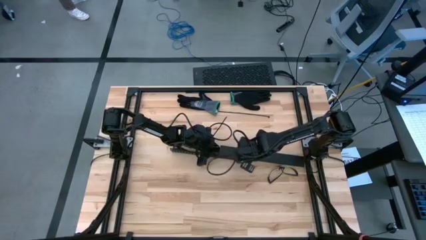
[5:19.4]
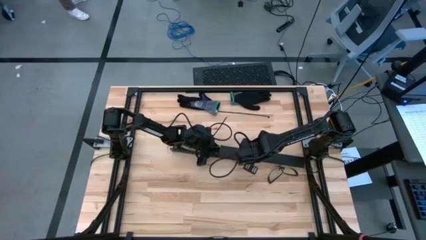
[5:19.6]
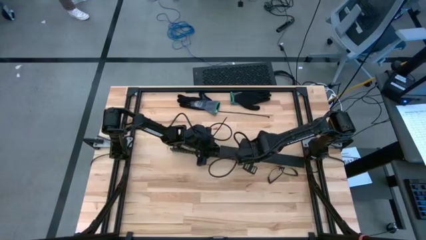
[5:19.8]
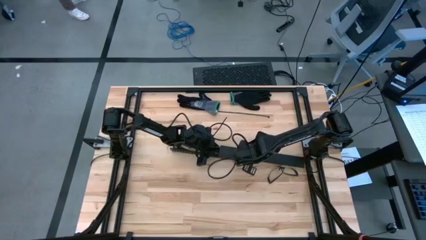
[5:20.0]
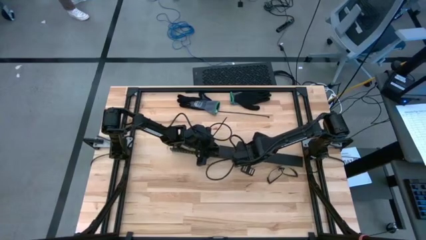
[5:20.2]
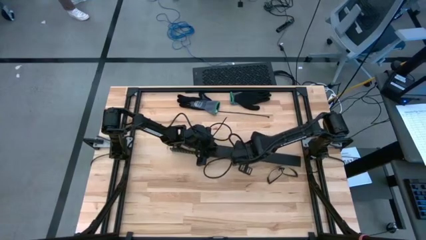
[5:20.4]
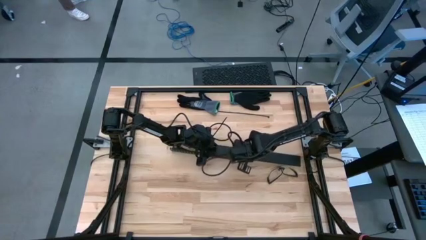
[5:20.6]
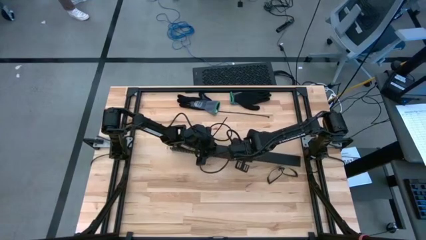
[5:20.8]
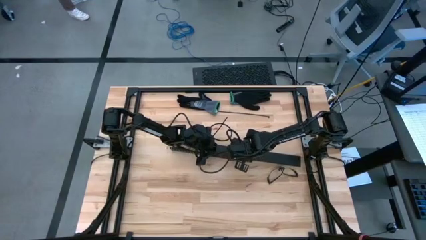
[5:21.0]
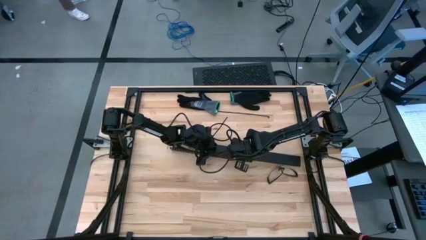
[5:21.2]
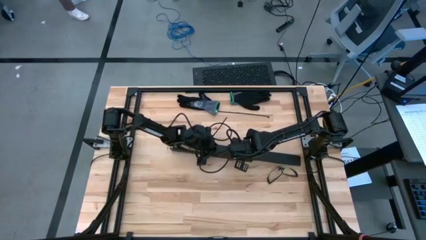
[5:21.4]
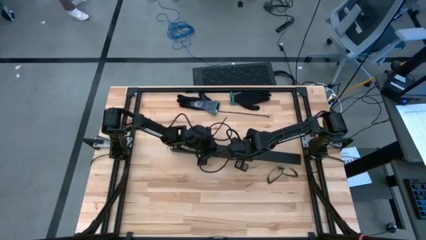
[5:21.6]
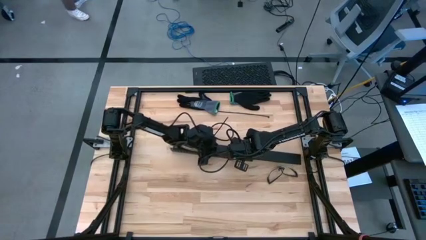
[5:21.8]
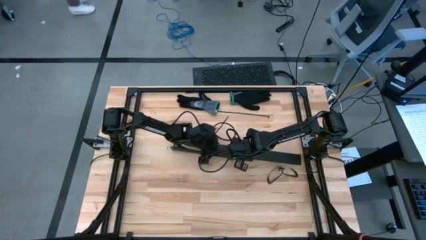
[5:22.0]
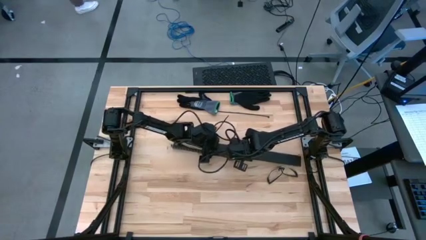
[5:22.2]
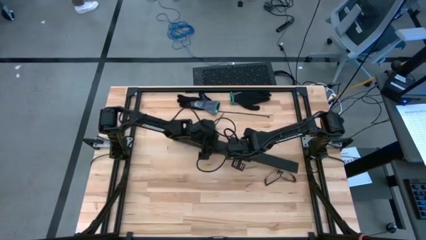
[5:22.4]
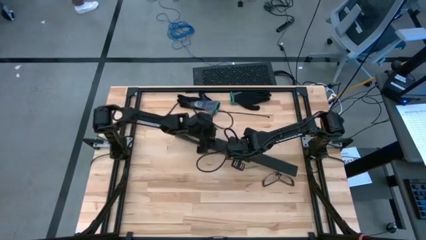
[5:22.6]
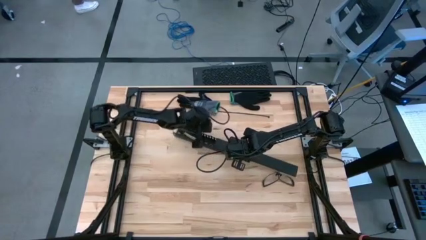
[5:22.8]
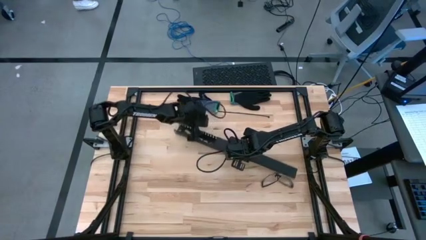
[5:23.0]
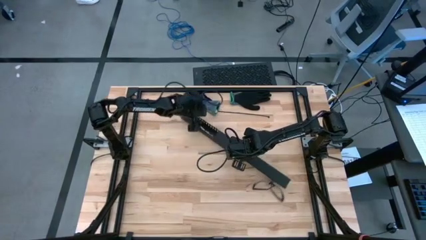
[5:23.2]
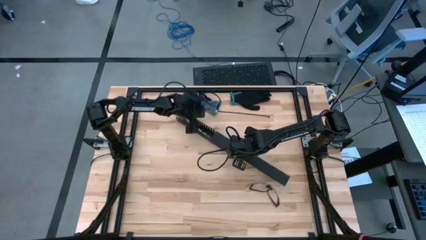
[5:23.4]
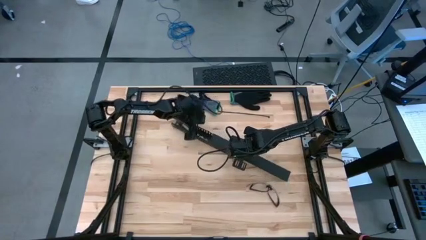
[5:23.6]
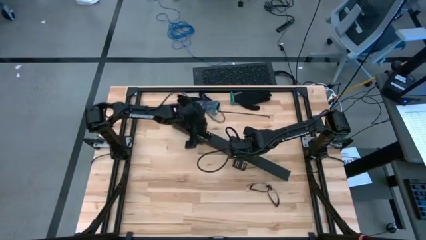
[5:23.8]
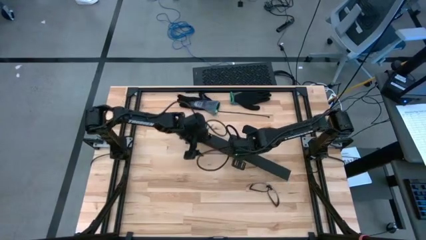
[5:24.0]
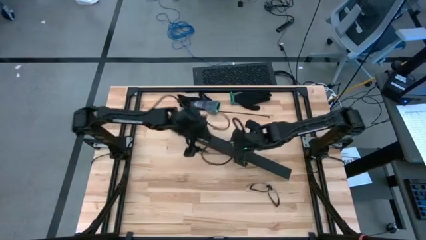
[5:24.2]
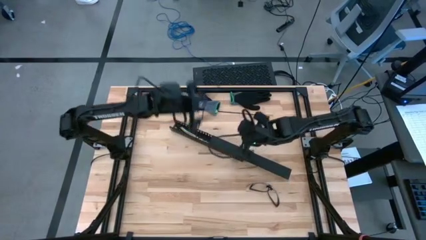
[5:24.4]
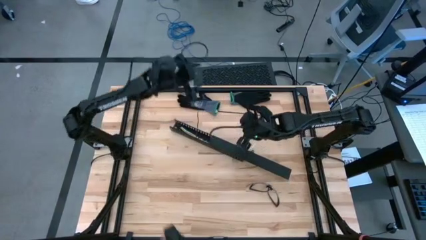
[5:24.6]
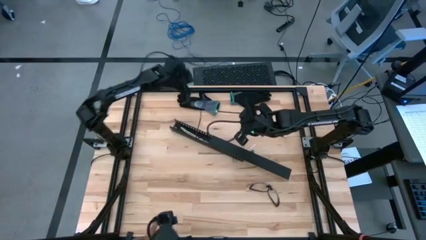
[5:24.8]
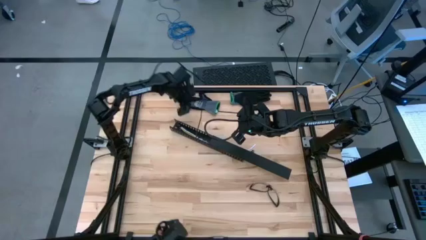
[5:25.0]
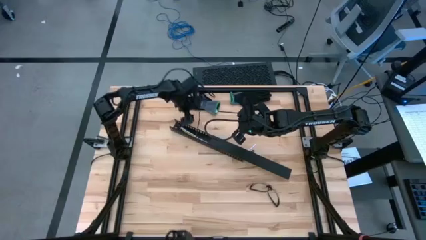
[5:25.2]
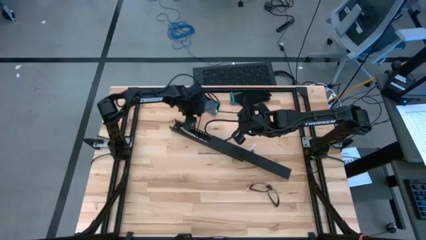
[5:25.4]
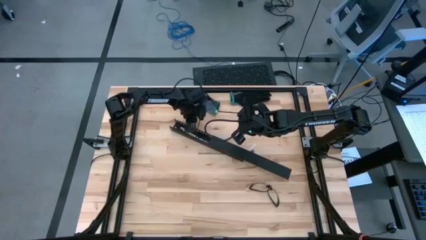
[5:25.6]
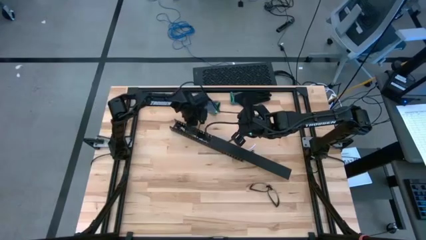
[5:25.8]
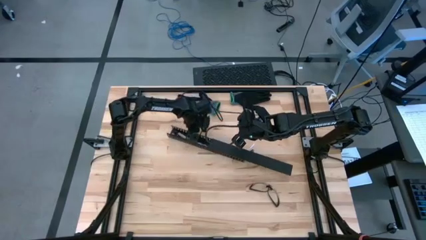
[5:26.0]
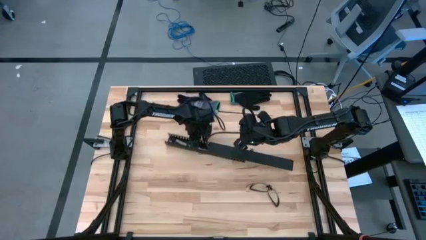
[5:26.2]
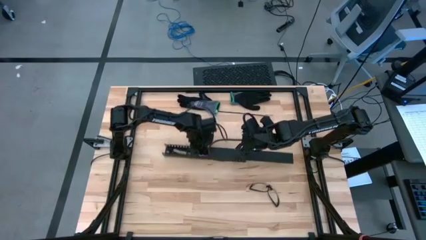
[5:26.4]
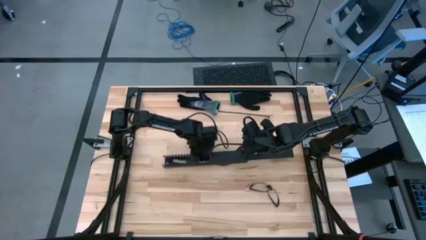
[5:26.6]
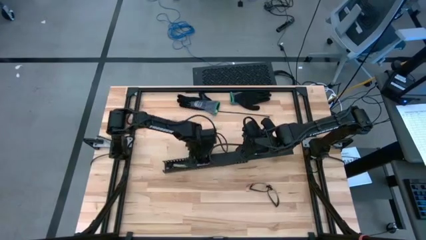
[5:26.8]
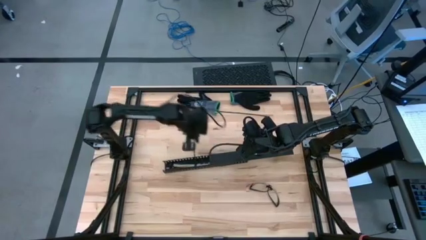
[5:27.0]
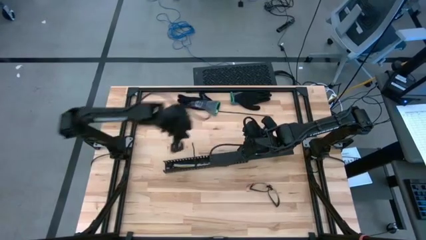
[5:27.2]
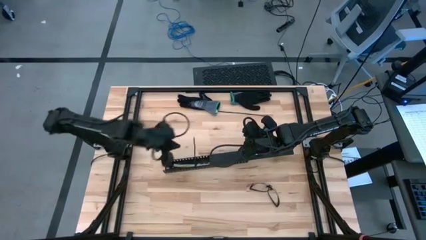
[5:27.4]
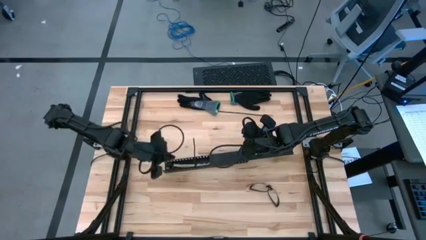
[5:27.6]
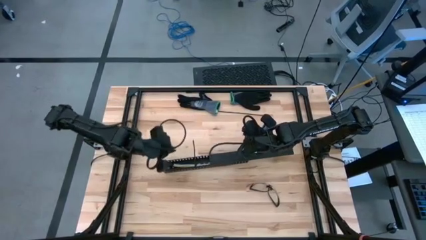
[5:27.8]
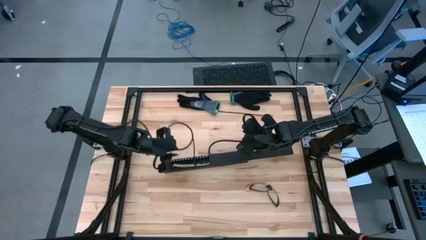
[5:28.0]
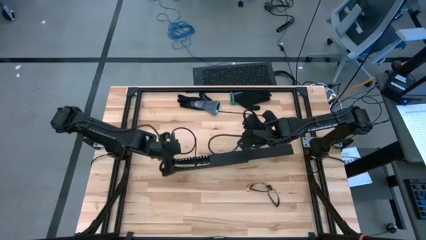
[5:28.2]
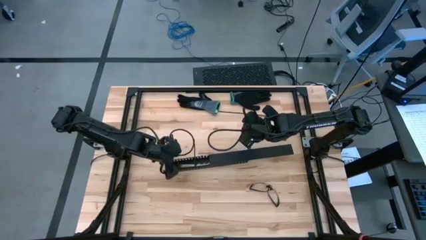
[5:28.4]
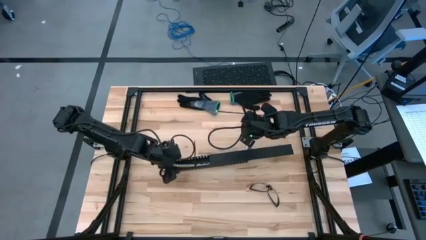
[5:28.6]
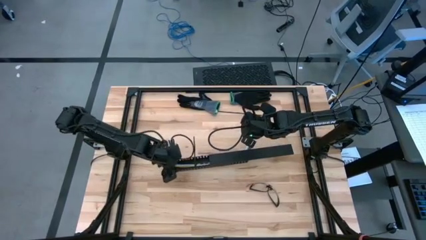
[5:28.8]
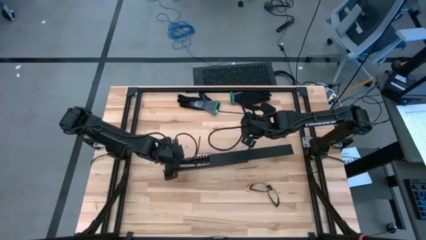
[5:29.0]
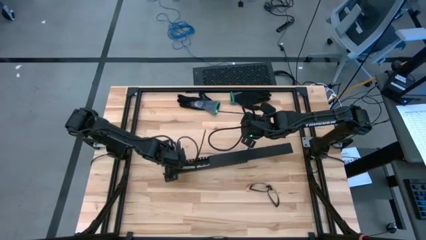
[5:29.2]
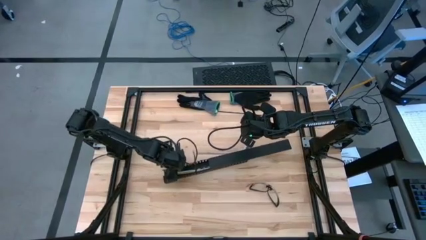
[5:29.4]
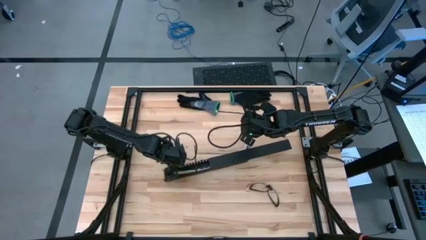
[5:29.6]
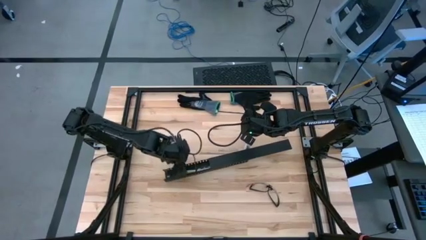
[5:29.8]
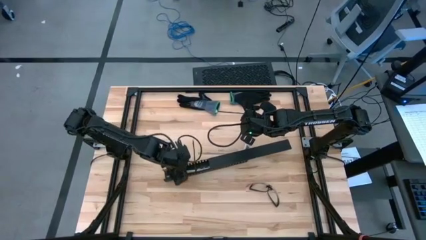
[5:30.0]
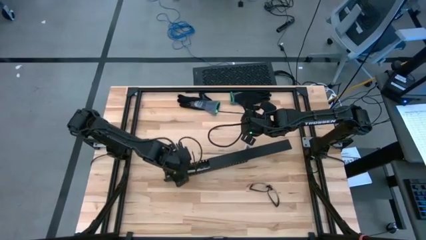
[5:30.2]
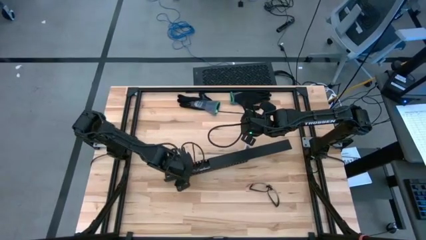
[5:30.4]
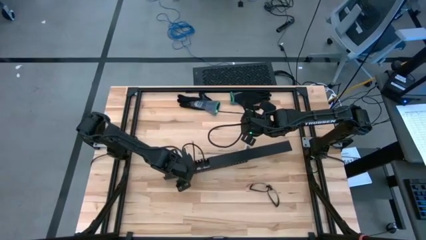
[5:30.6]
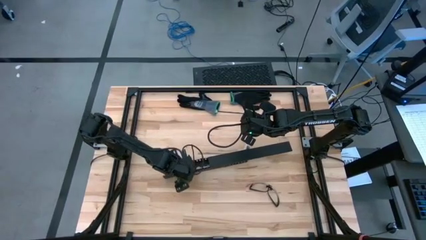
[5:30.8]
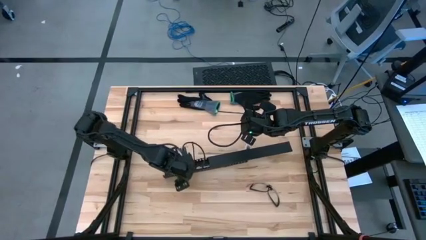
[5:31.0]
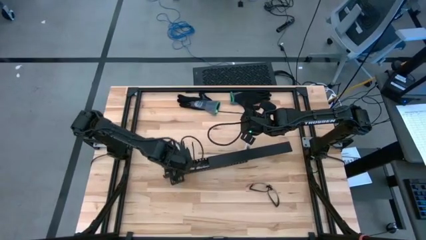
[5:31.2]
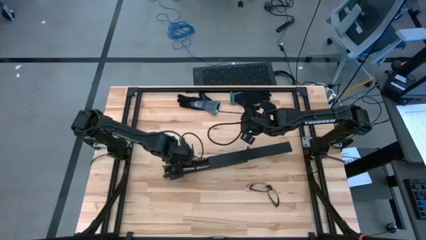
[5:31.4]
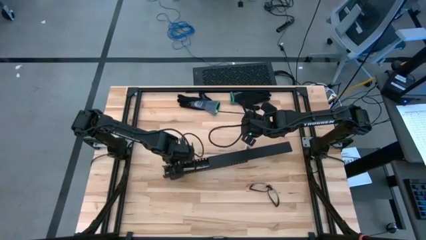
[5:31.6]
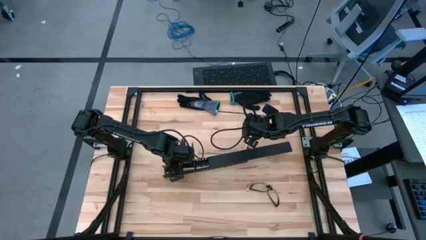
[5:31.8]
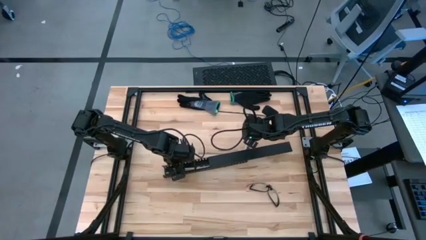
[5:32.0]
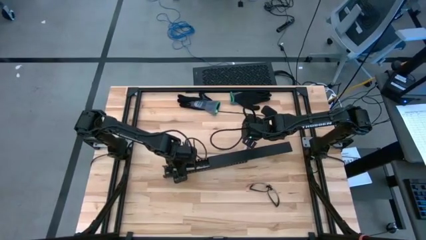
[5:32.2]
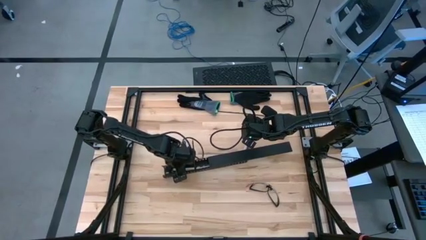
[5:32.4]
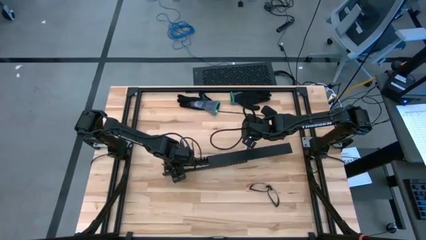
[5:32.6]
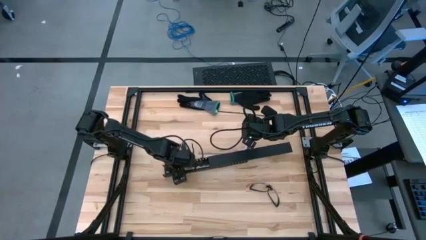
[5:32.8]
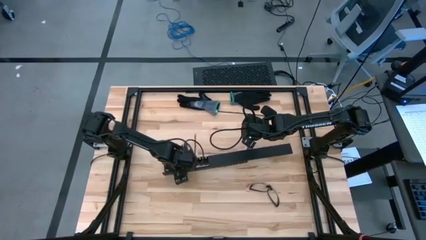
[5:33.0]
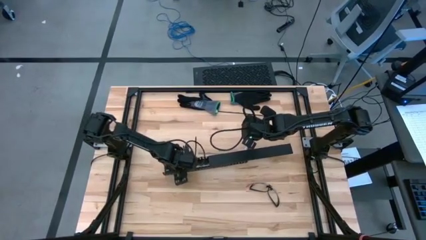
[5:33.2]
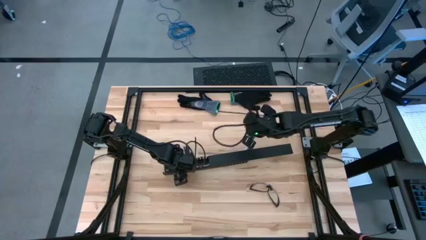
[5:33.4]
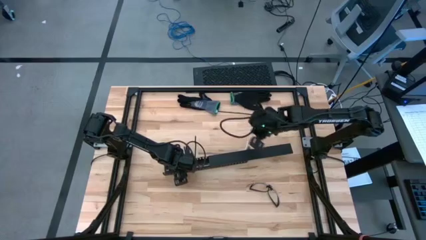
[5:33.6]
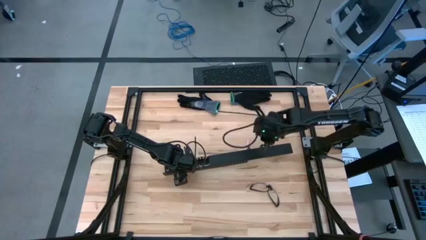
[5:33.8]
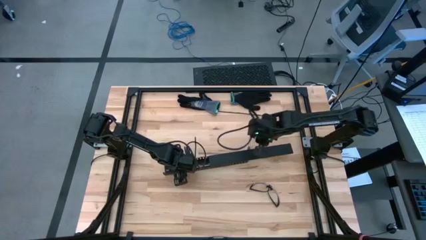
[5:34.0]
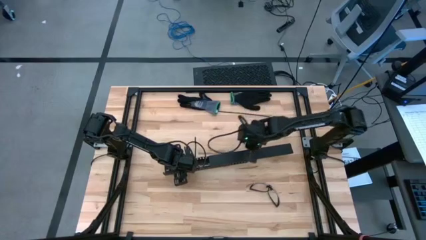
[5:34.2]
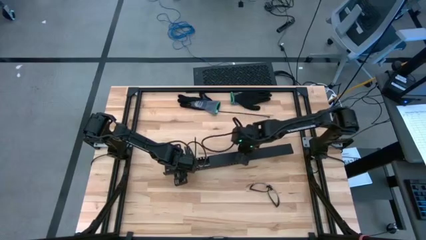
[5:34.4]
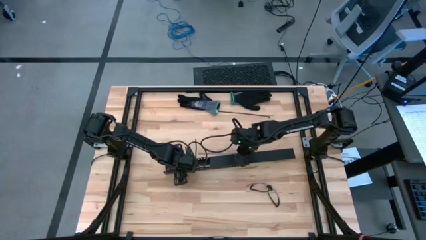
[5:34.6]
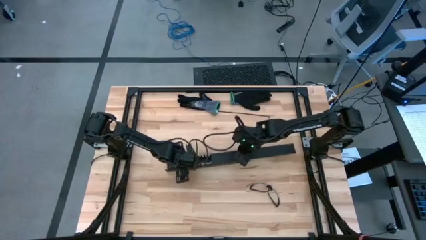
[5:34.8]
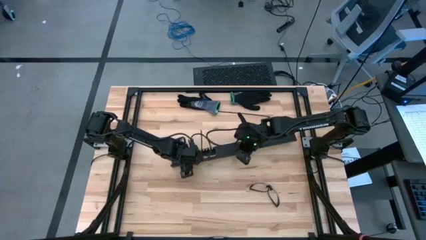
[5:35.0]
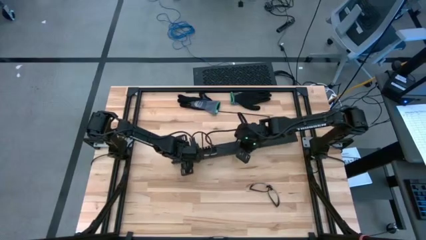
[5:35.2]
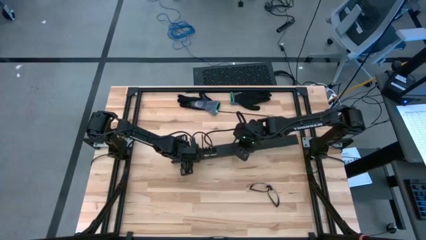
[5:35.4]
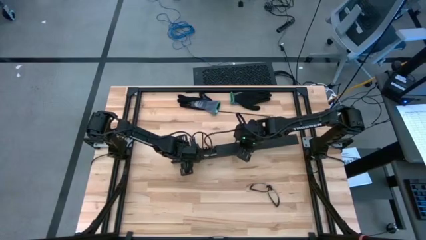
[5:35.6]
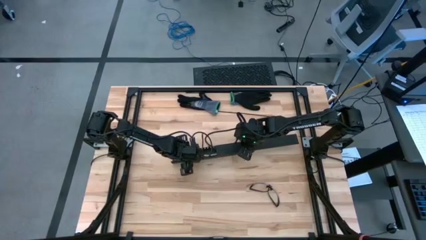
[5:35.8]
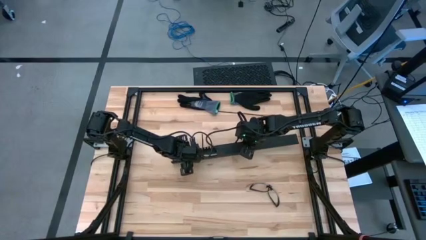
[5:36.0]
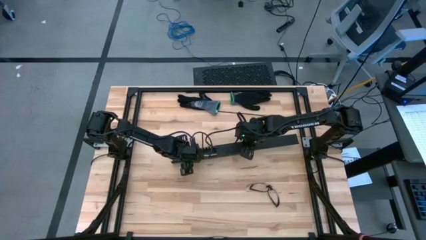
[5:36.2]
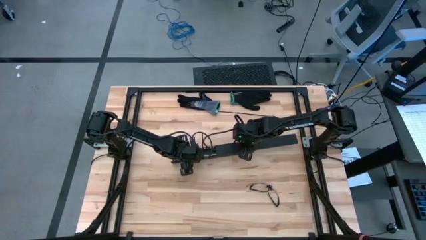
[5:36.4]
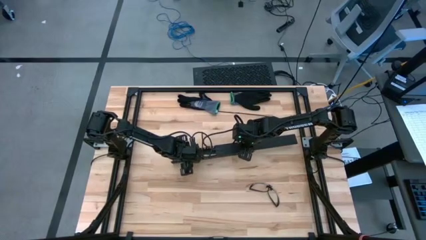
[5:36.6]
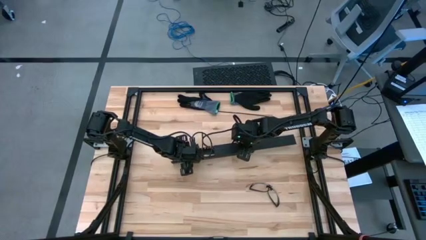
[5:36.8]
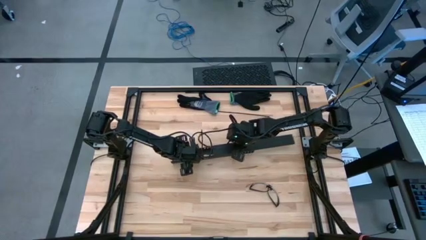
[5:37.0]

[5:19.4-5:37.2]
Task: Ziptie cables
Close the black cable duct
